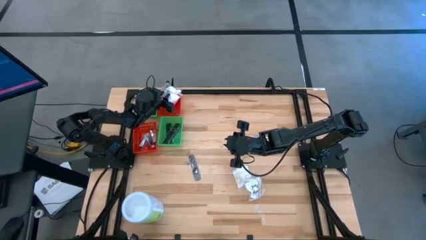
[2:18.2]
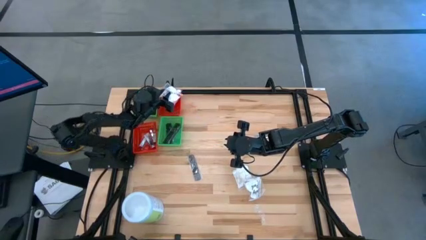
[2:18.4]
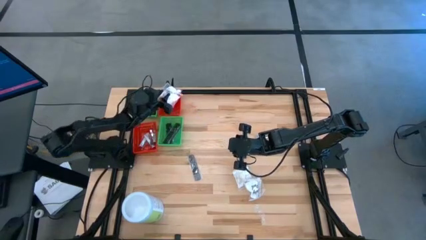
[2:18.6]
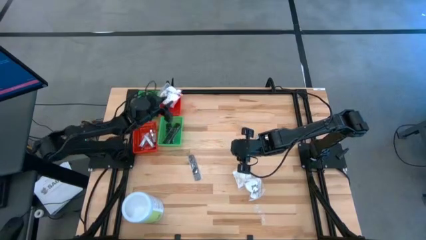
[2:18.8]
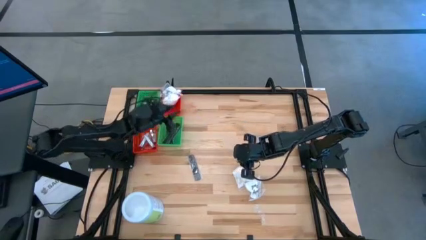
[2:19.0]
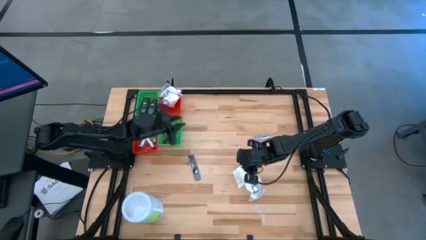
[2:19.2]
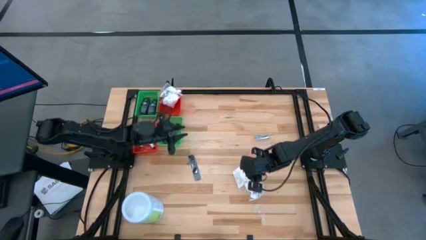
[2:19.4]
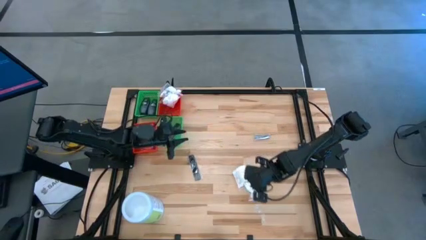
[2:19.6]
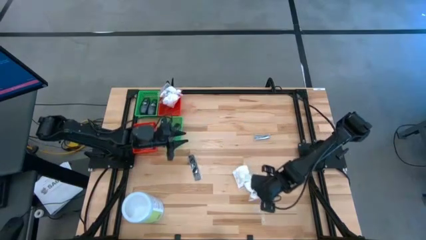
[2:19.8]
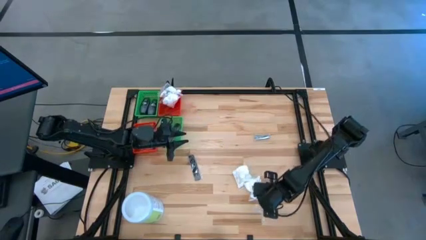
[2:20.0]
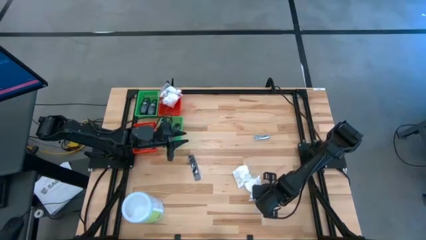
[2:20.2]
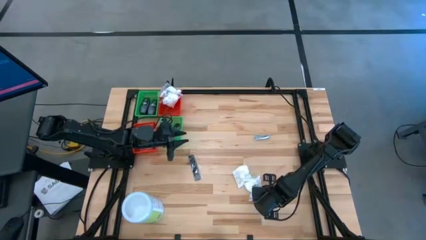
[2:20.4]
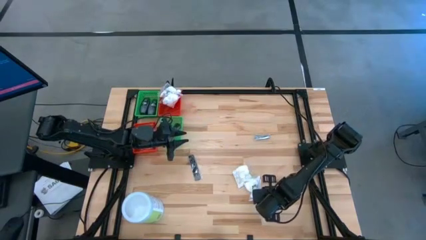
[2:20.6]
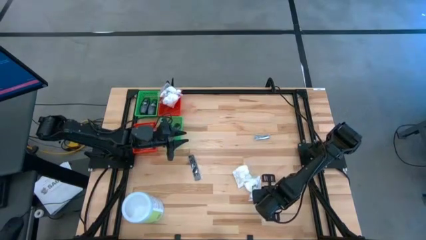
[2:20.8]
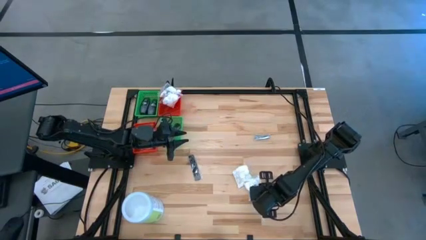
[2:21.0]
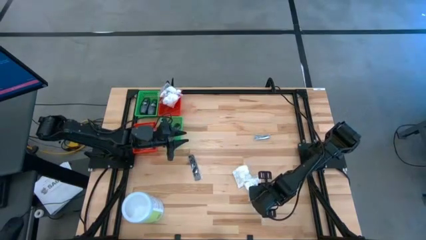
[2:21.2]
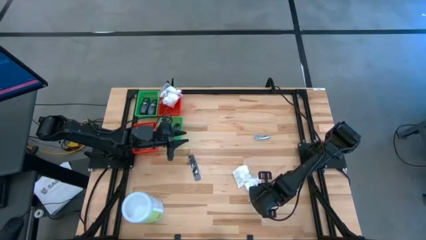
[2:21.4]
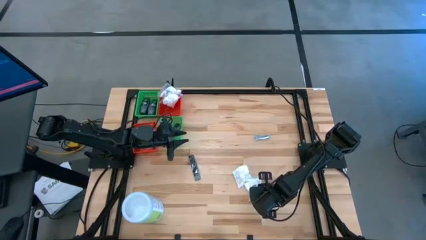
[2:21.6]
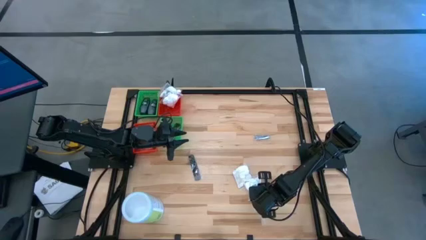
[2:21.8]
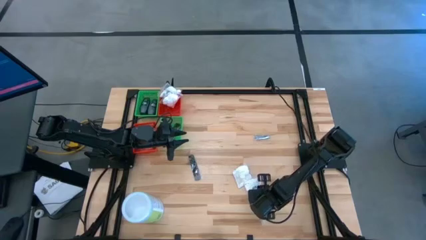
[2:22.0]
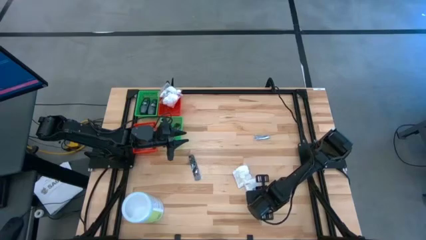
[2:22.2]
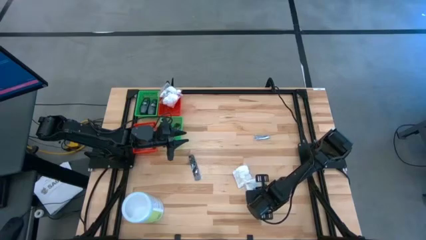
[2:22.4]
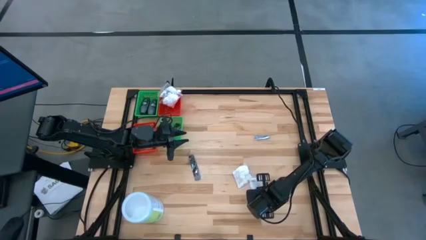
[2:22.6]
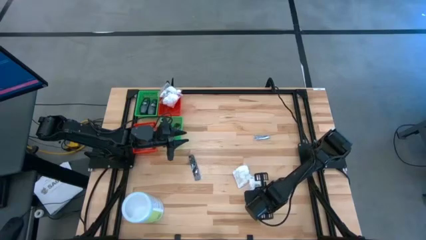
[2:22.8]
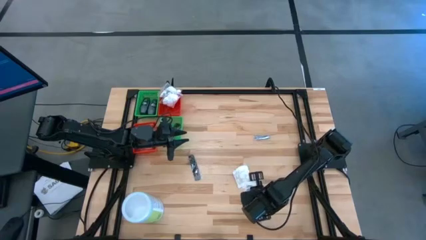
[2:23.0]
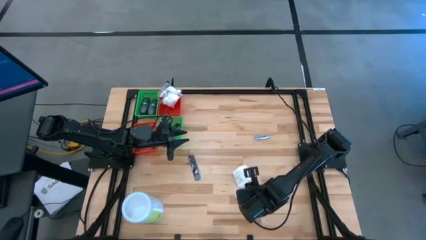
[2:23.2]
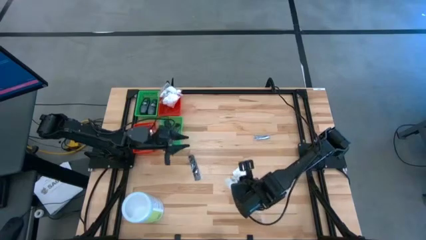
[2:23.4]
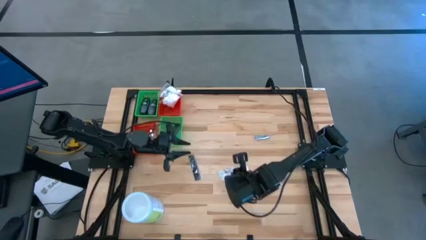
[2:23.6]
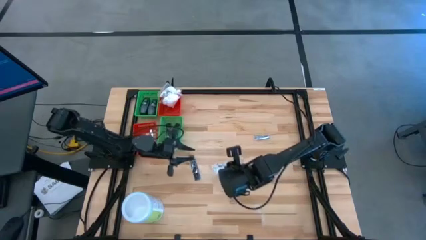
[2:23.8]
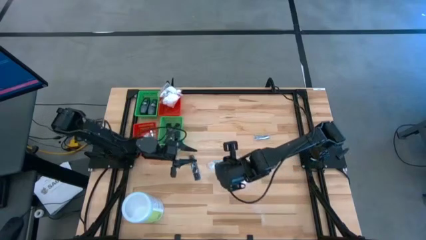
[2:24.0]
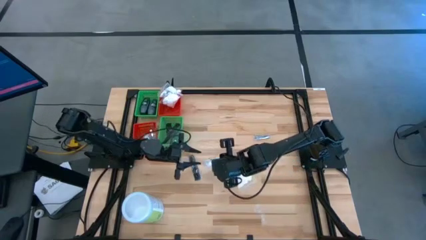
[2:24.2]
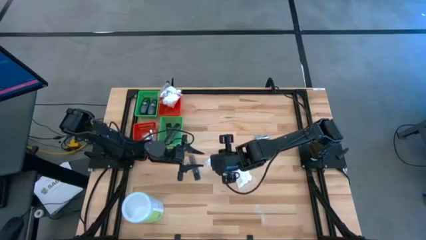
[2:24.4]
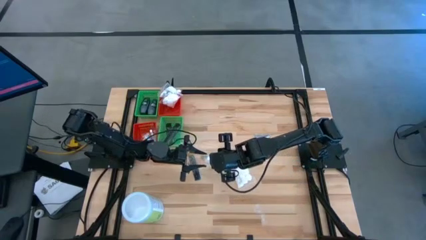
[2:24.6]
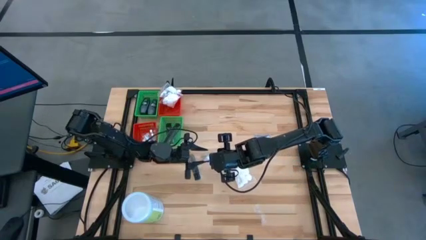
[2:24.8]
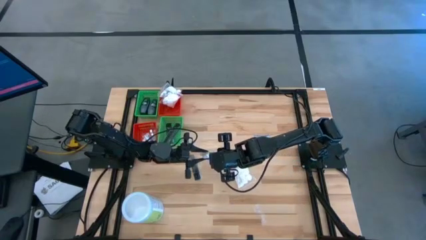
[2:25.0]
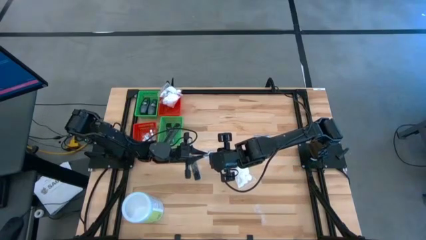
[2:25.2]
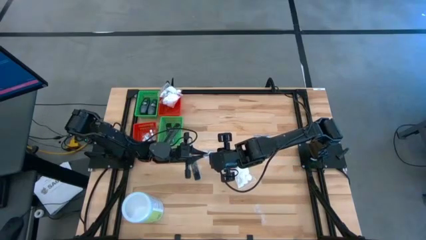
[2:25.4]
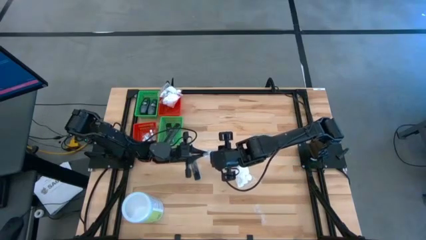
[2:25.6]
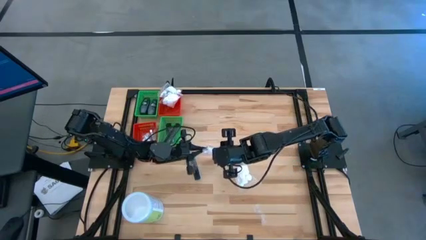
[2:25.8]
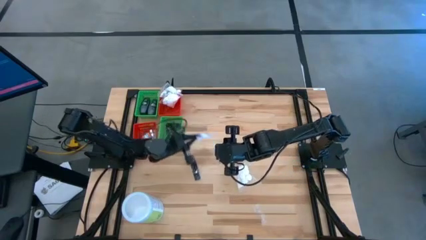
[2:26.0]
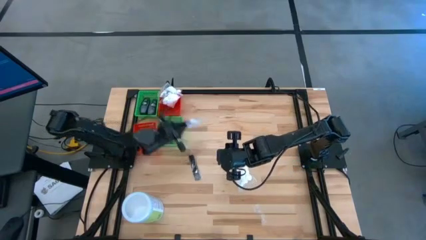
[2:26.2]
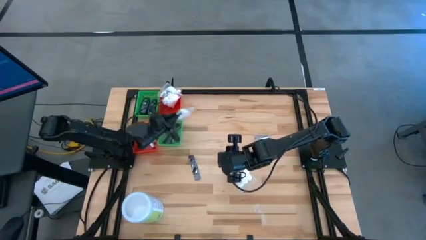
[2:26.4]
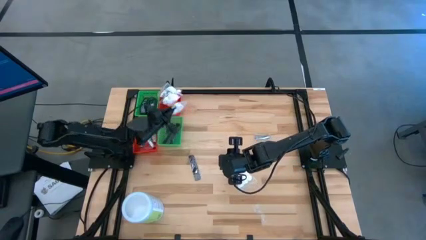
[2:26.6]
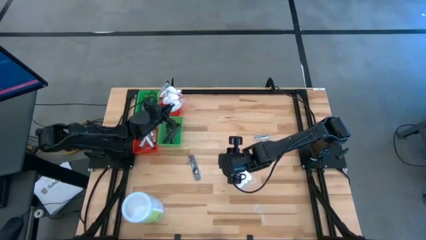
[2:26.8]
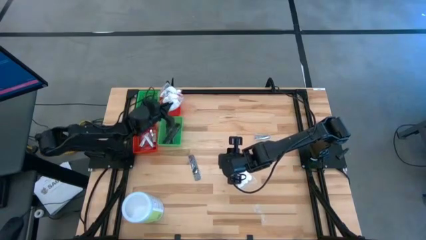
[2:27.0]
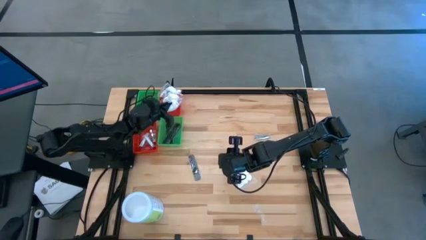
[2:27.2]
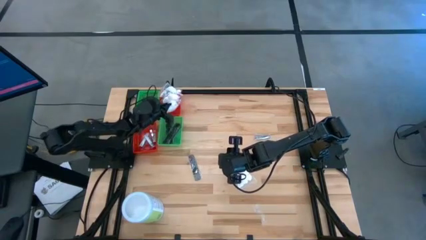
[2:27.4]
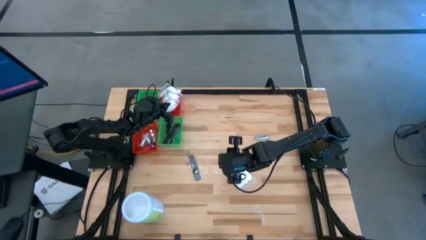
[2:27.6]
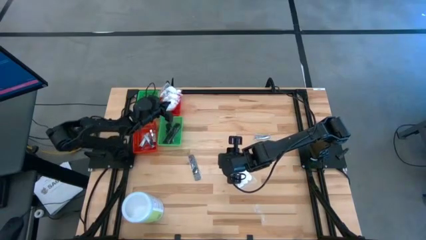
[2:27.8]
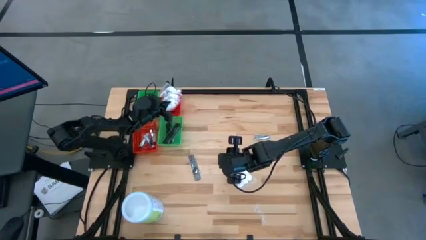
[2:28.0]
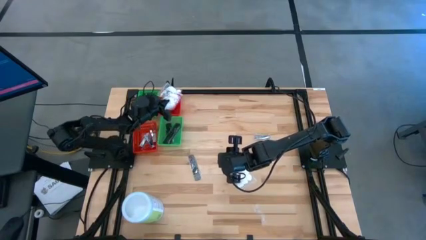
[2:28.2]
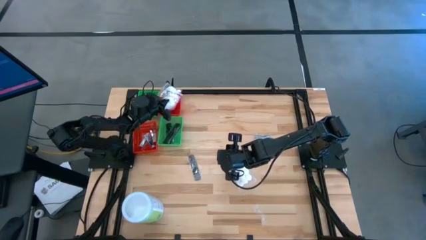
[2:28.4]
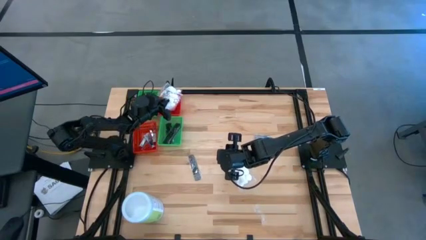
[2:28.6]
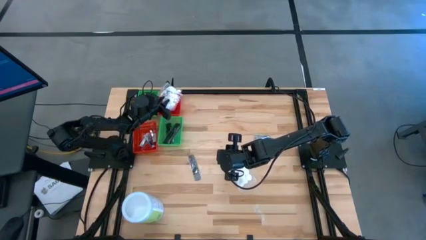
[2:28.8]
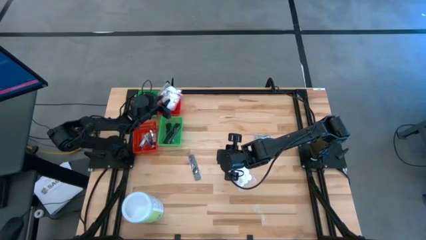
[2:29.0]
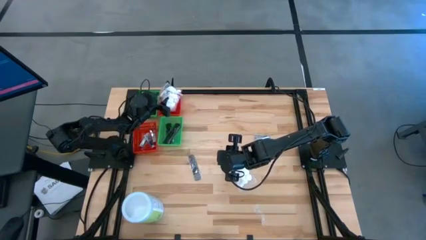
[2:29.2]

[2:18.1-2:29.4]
Task: Pick & Place Travel size toiletries
Put the white cotton pack into the top red bin

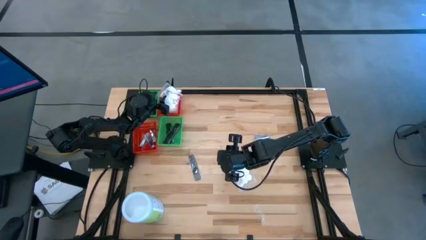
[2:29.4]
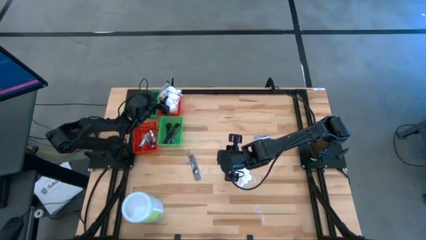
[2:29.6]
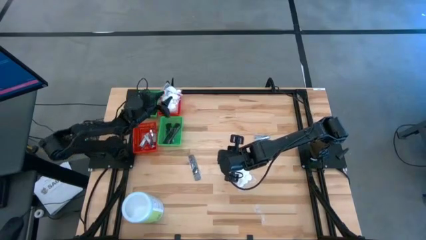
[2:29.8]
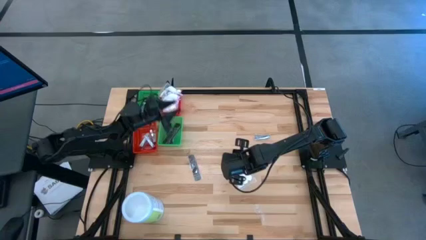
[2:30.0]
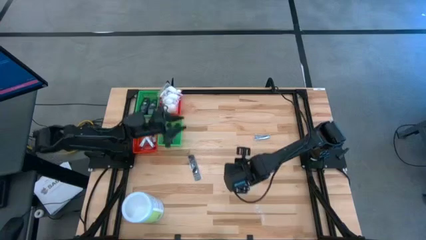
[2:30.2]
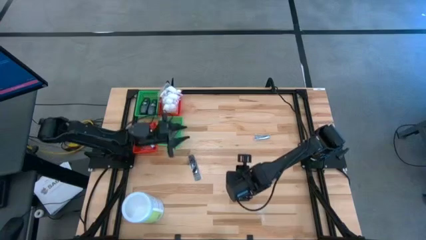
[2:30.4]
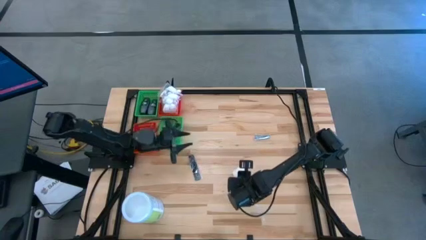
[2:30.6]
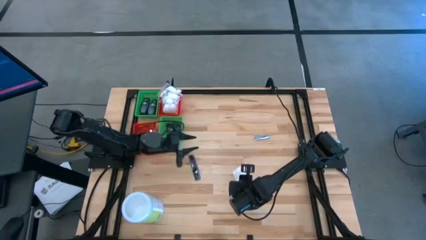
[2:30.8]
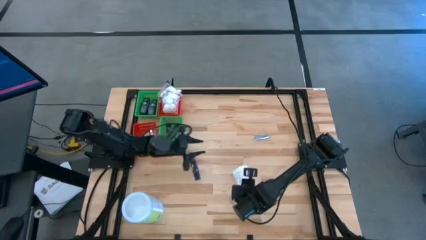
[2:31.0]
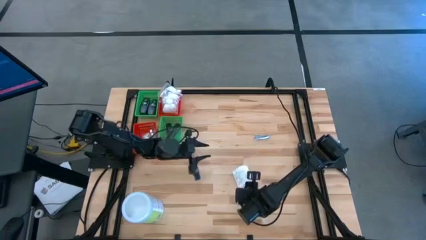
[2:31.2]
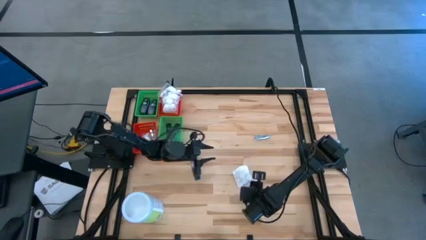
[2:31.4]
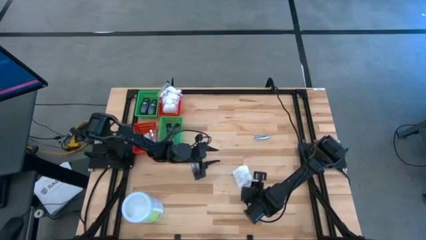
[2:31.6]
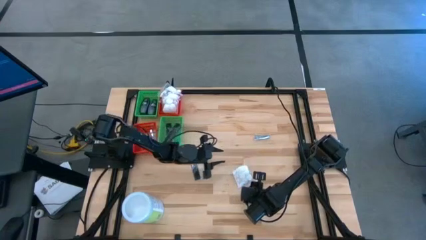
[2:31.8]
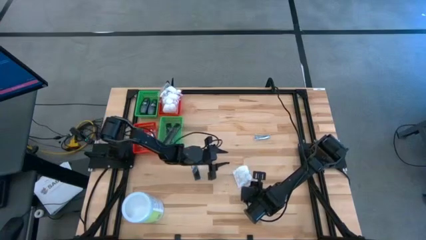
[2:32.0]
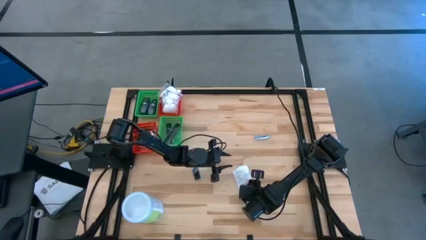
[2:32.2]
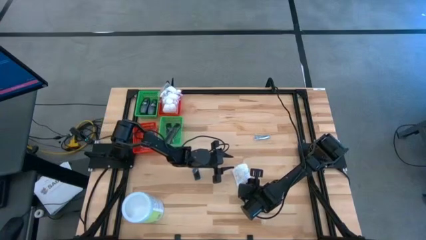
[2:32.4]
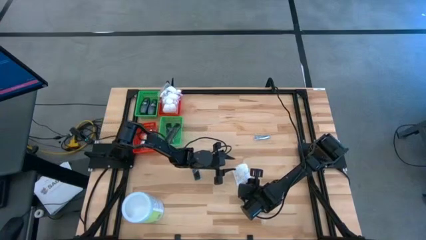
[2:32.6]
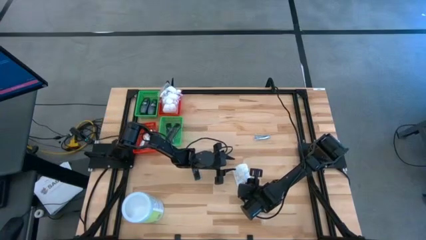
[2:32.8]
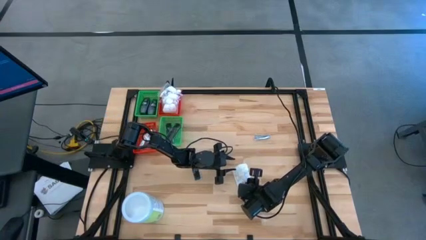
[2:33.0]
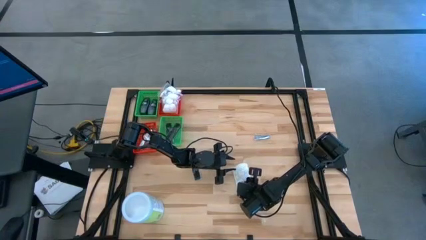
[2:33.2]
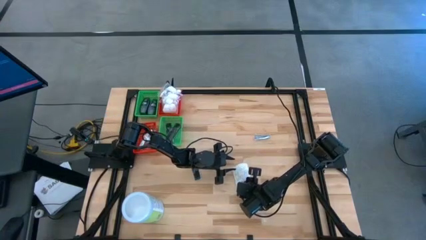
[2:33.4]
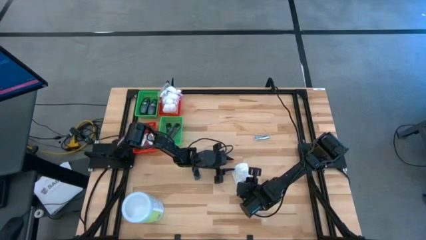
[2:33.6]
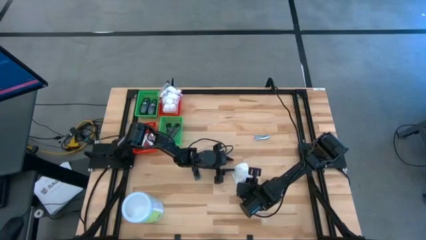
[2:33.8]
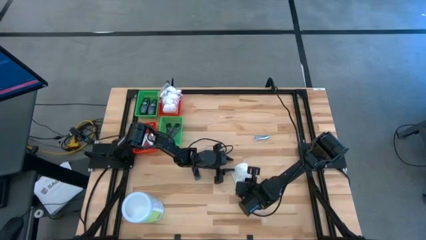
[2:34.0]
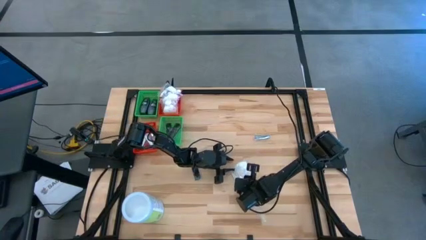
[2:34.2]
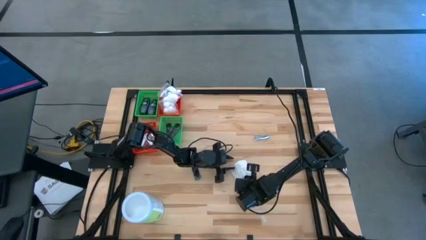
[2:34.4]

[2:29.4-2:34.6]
Put the white cotton pack into the top red bin
